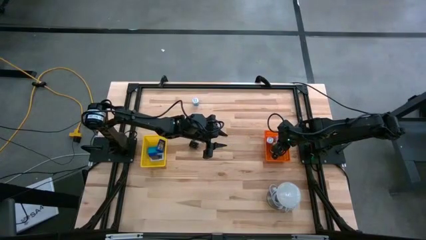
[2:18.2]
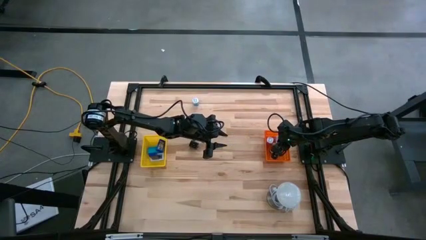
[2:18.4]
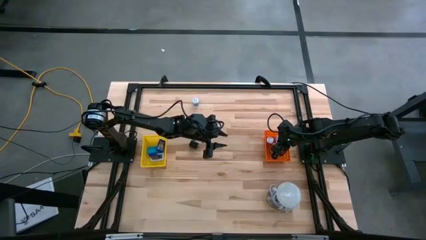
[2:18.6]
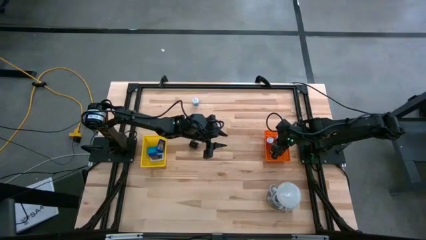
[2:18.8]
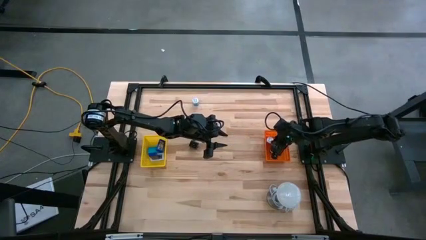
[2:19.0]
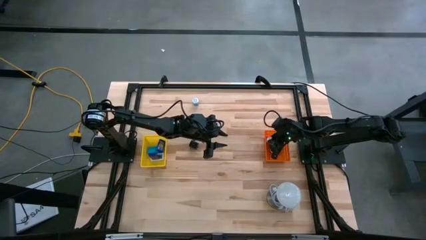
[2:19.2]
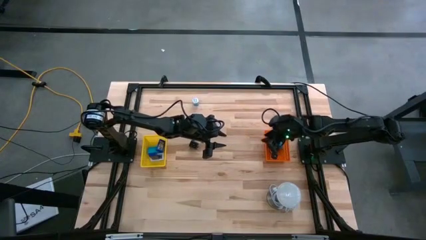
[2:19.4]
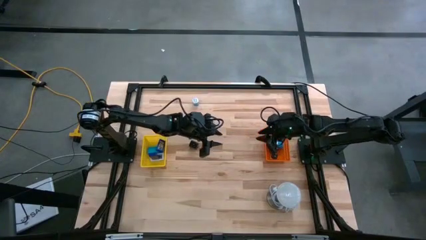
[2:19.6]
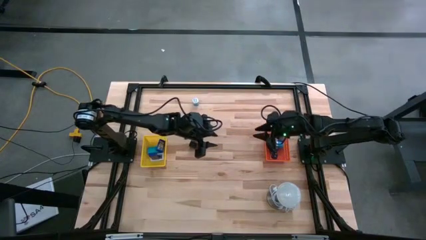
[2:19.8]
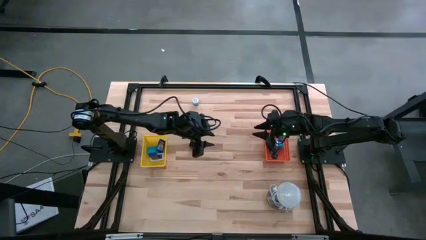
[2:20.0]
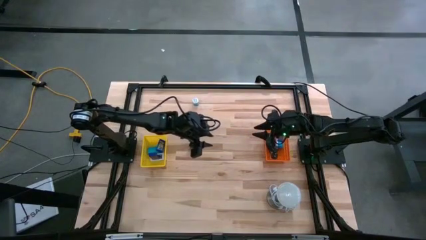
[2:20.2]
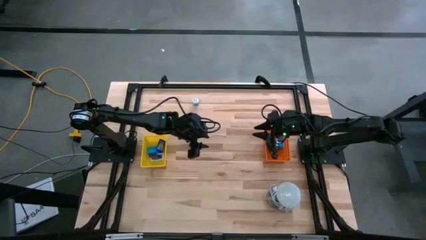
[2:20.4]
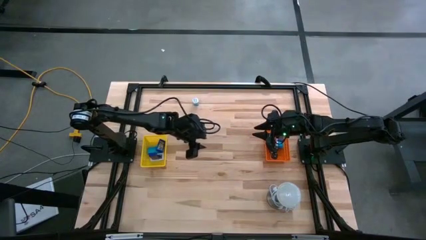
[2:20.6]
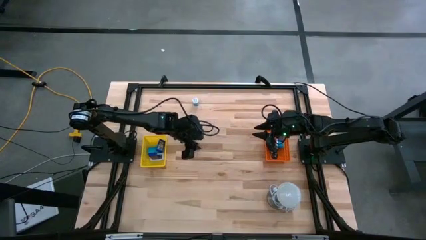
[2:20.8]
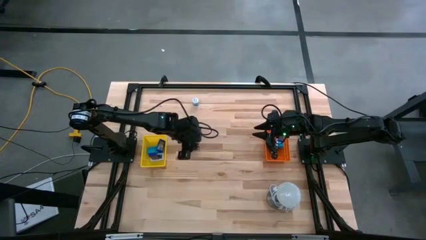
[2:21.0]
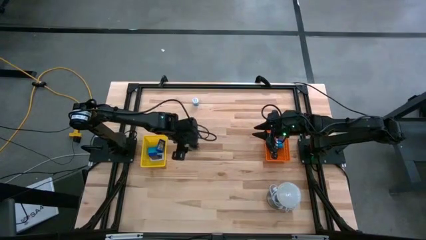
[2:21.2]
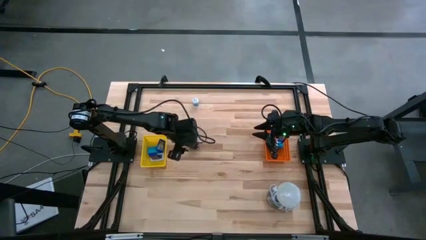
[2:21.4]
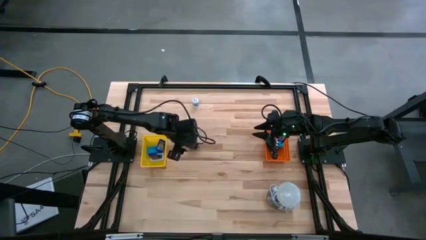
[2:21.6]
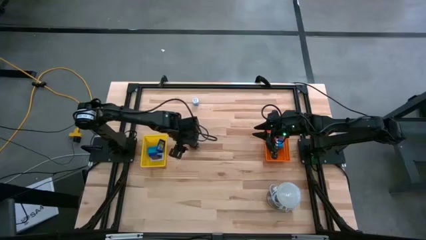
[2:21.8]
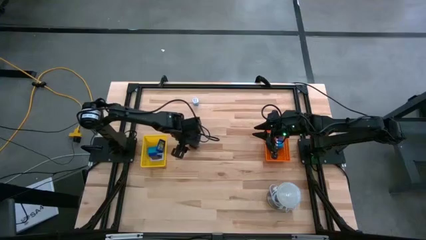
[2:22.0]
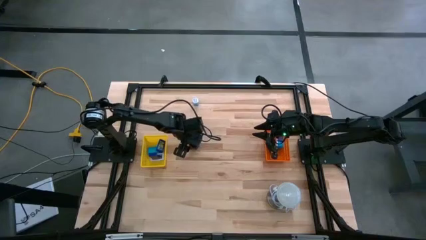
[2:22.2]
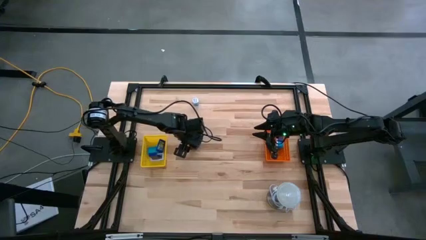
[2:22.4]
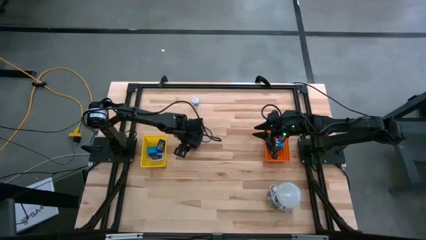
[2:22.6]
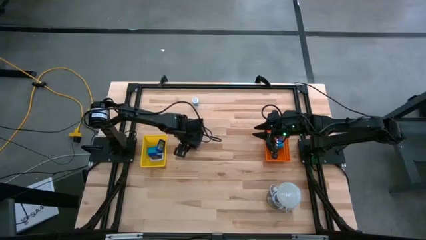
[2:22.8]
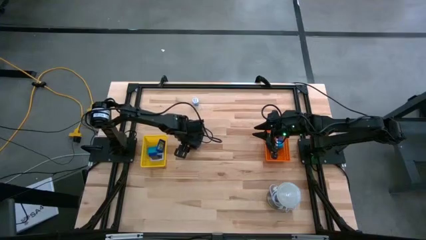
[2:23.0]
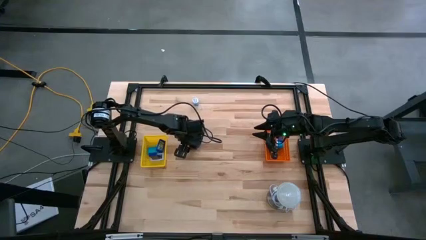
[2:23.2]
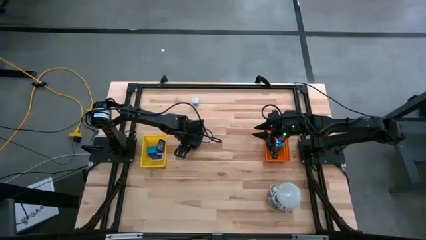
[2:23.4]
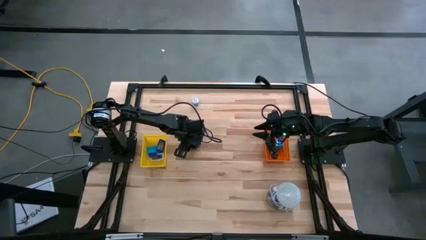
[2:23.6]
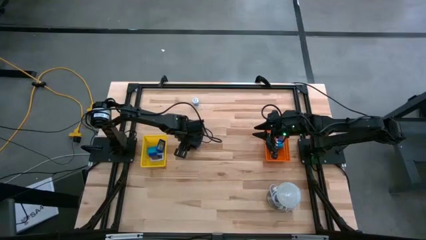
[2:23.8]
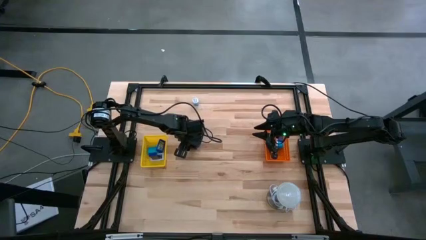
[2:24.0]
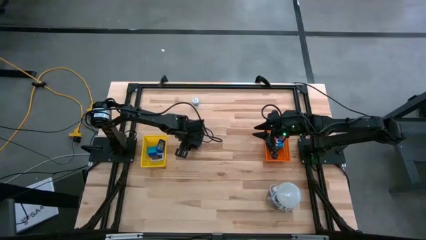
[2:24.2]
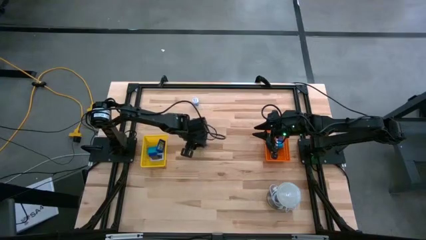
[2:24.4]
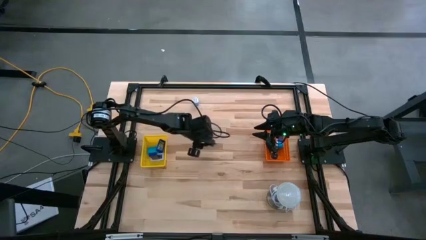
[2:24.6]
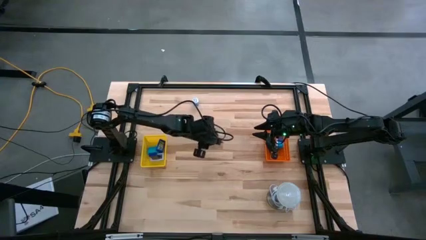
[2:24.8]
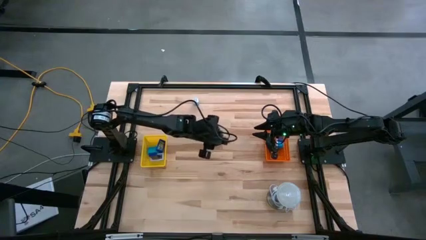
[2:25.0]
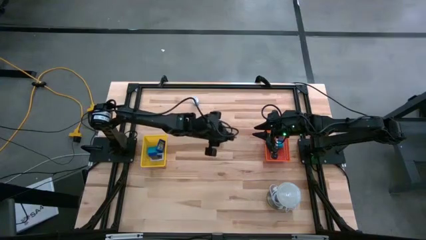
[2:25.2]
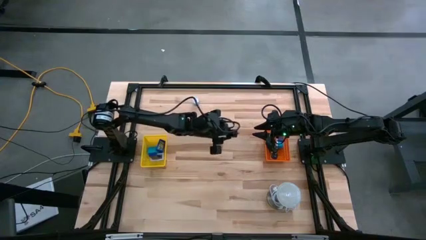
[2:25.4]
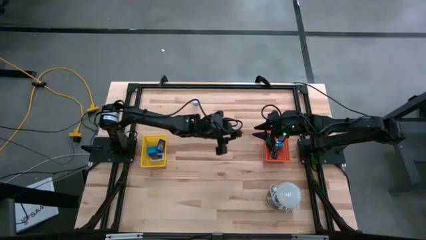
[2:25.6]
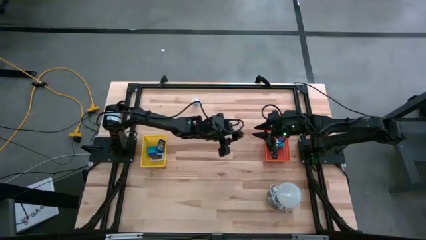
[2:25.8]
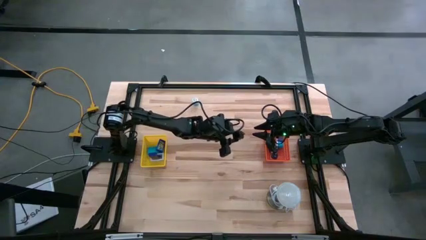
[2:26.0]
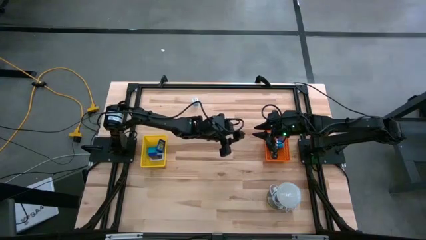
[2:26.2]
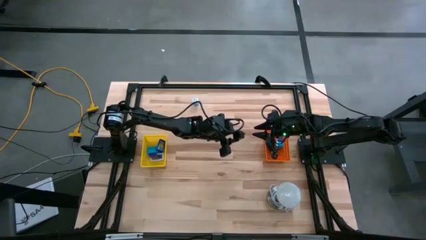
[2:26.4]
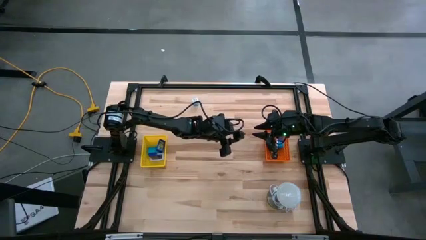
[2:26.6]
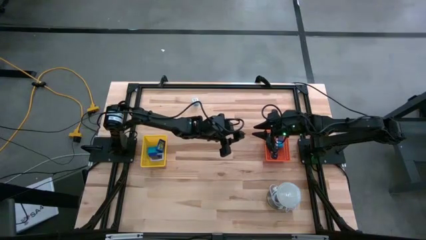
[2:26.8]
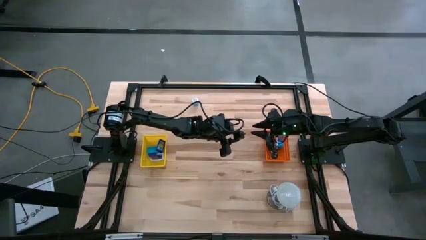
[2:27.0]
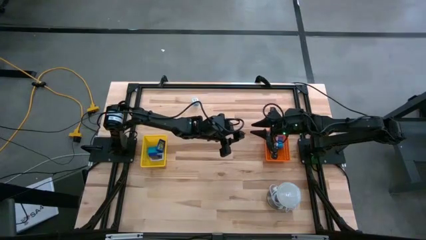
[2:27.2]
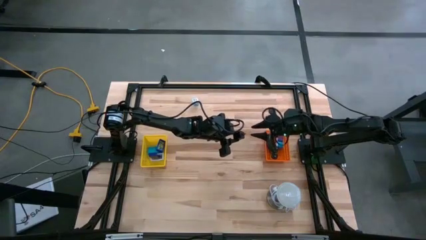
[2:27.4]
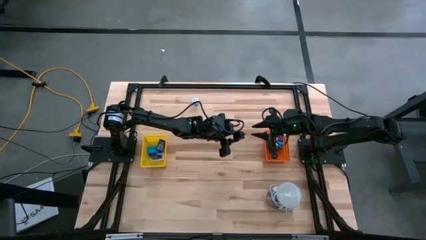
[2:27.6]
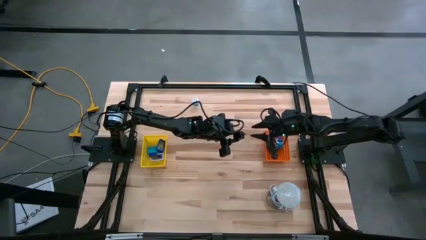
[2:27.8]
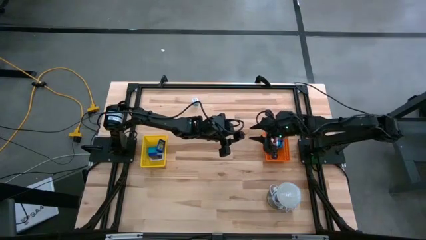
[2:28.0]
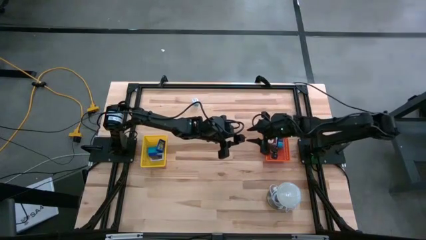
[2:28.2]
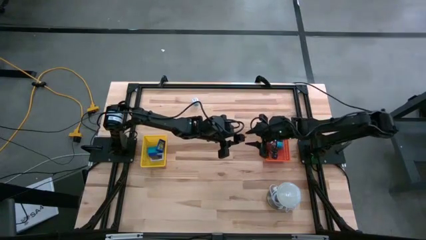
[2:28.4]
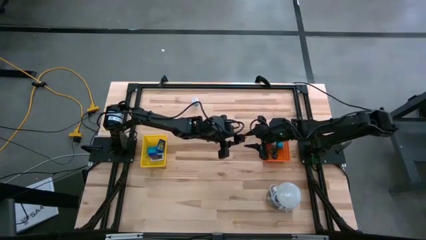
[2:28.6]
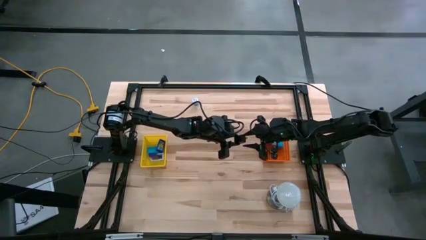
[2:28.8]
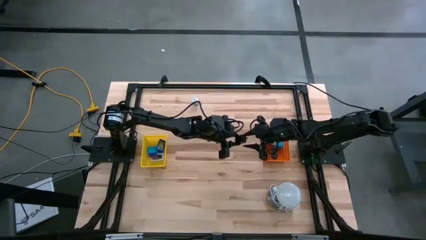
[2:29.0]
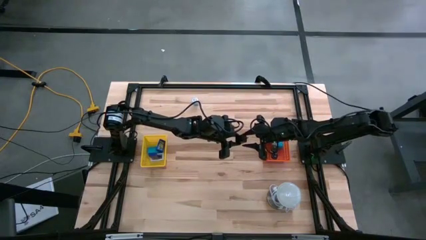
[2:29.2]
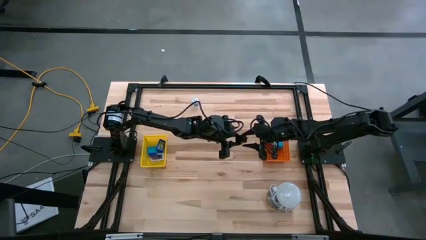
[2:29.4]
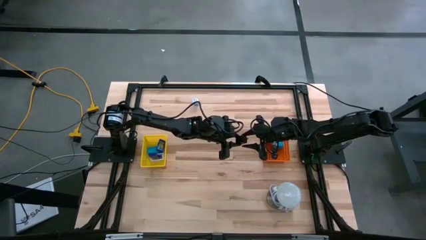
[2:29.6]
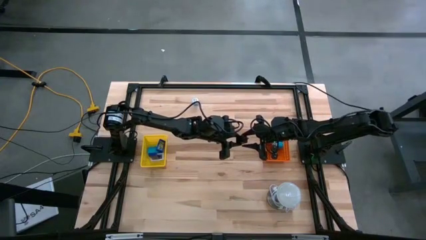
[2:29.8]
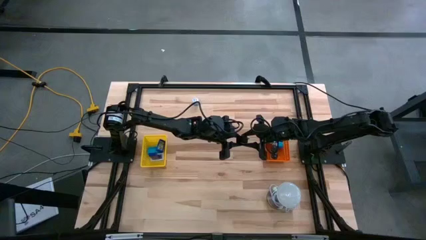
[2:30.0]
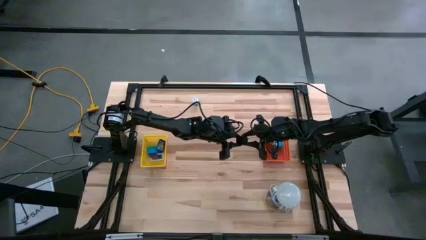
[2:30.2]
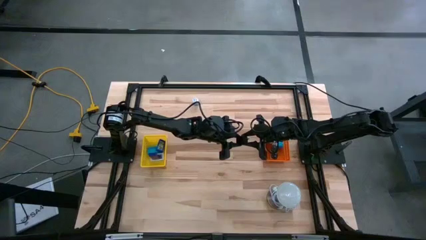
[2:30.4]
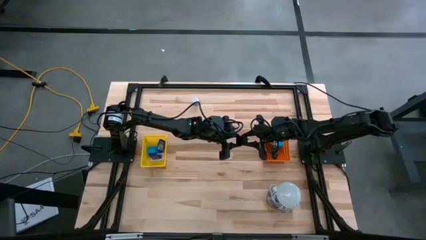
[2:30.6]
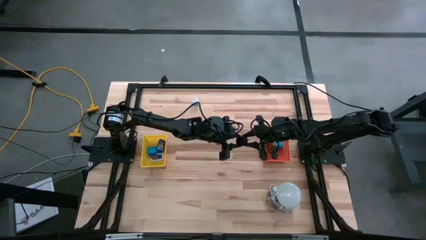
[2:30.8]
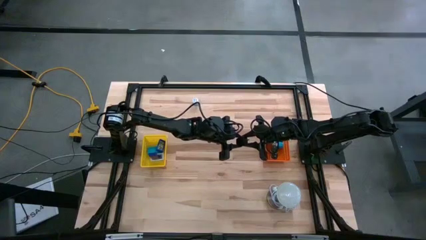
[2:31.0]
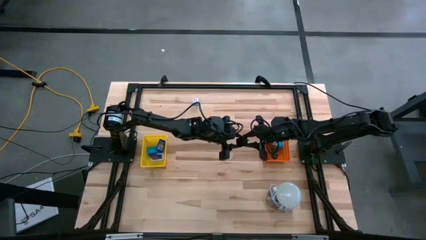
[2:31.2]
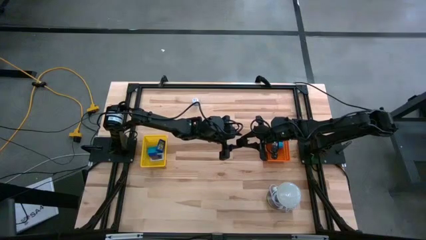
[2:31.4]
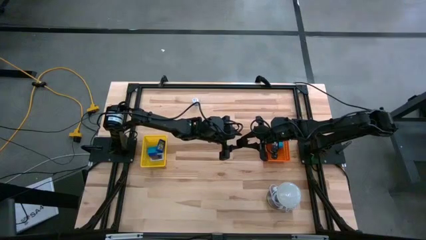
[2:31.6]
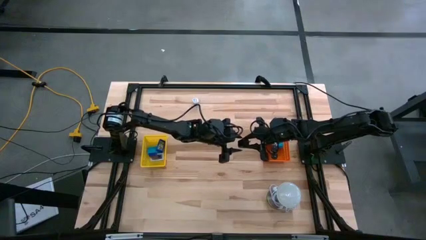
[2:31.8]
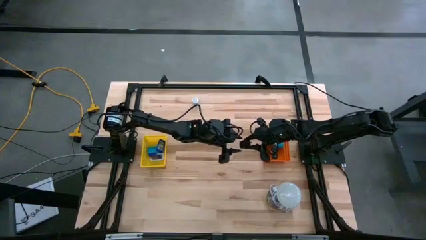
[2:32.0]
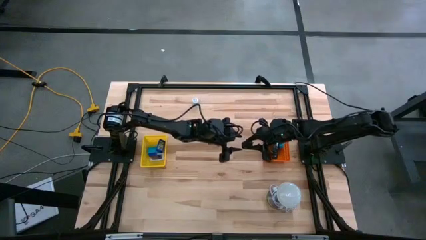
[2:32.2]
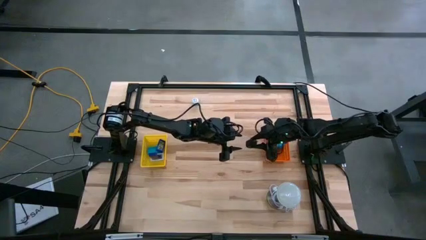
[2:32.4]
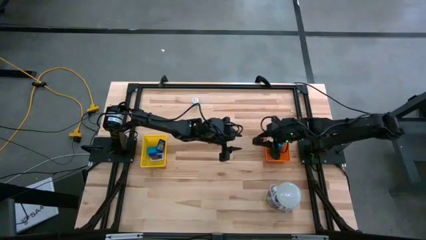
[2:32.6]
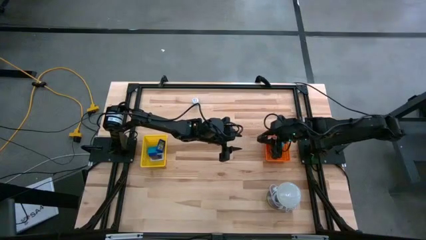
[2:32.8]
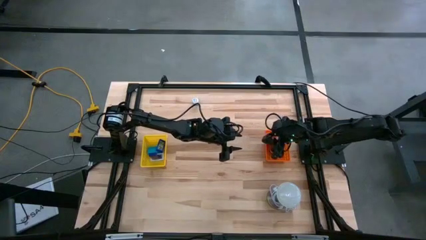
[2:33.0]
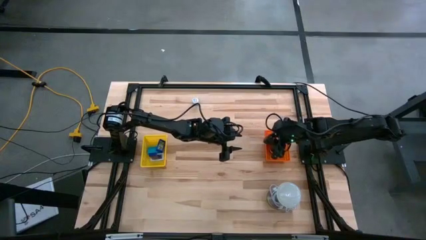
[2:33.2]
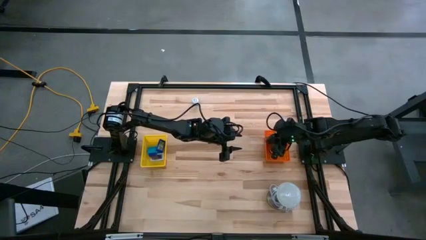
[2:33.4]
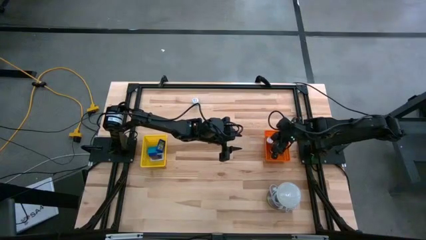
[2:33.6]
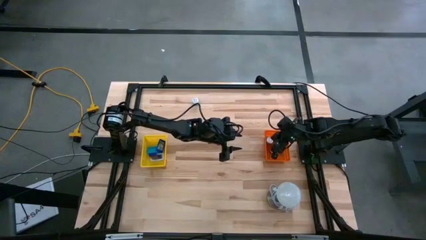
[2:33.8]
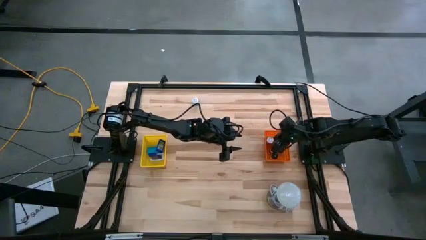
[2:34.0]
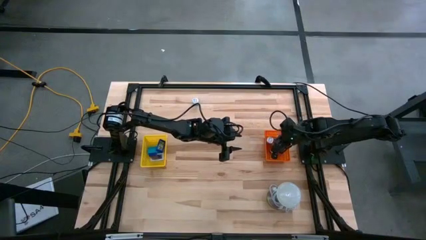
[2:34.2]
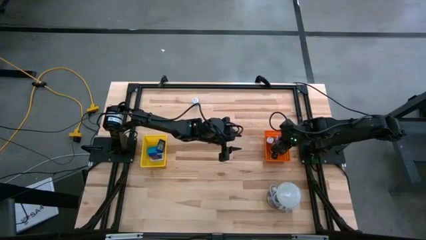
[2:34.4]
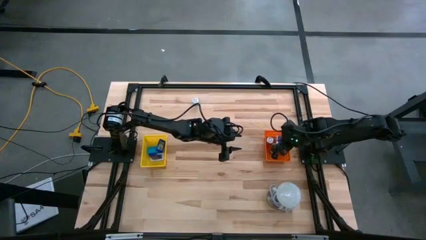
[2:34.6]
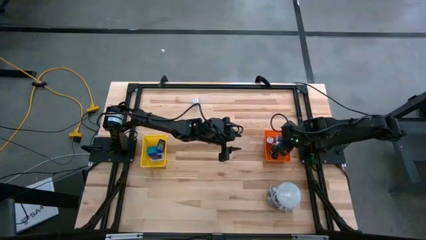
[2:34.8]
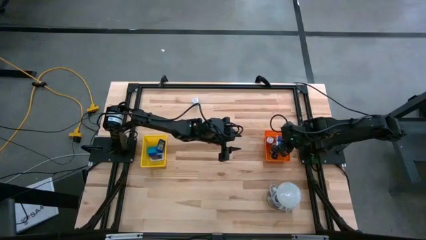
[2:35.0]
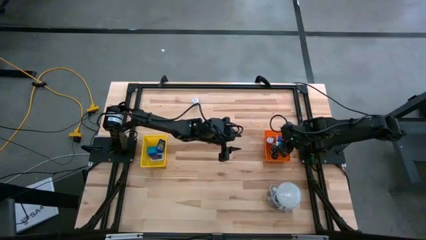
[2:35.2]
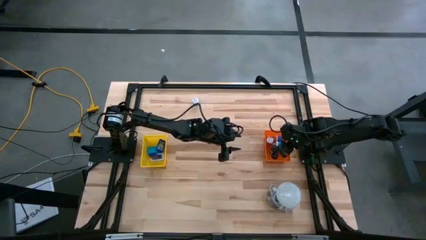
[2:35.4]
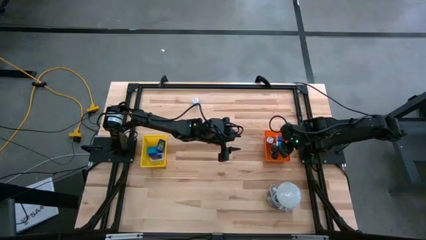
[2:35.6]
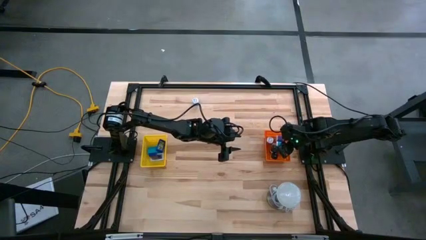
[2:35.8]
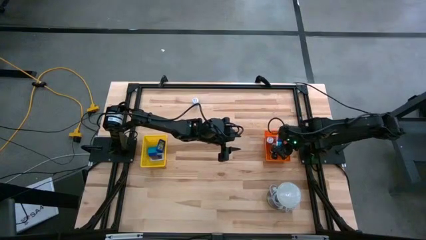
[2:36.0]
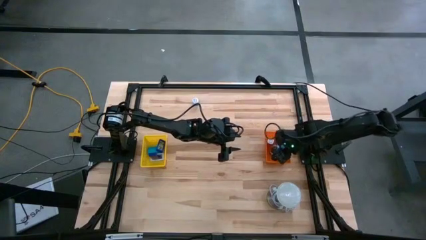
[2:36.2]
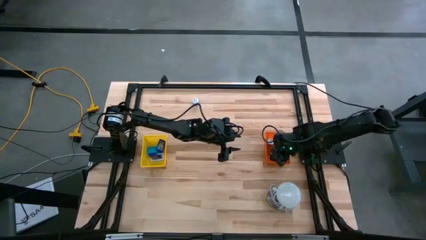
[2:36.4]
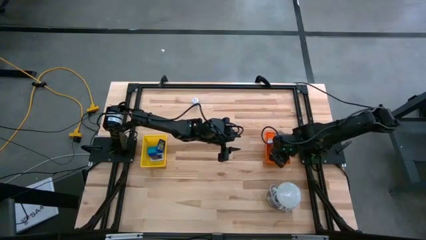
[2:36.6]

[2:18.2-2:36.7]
Task: Pick & Place Office items
Put the black charger adapter into the orange bin
